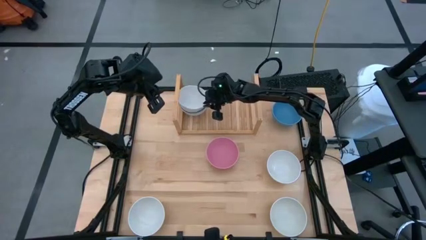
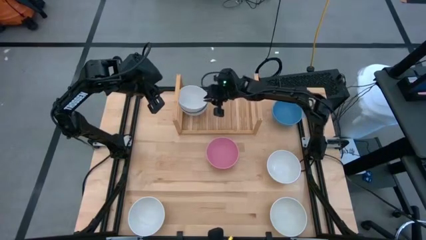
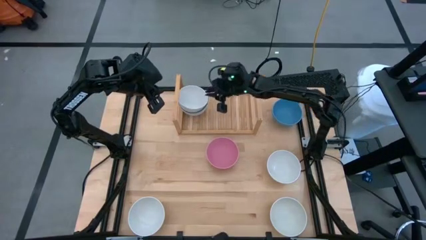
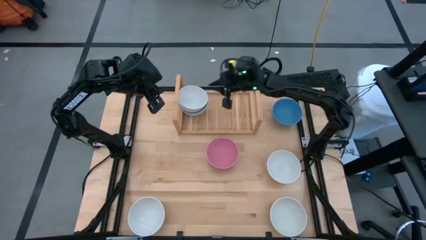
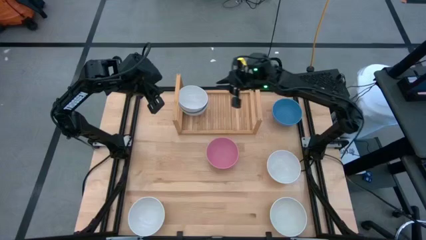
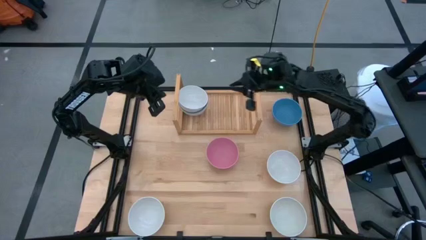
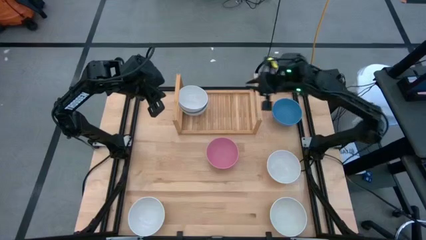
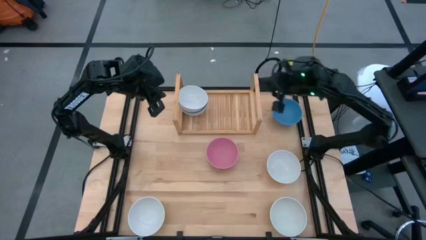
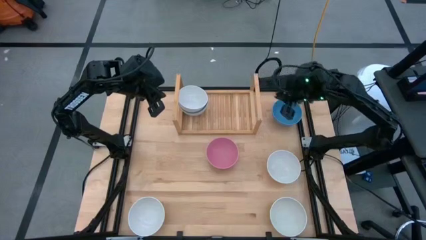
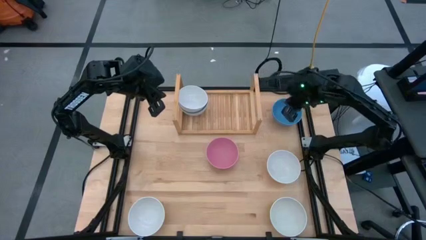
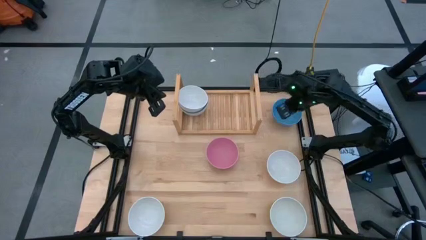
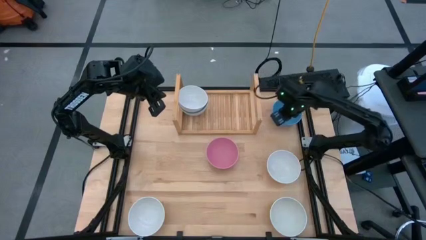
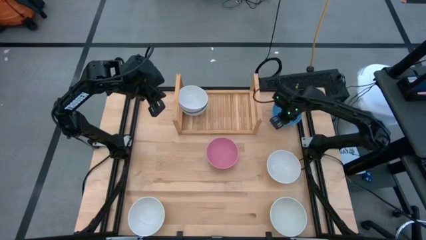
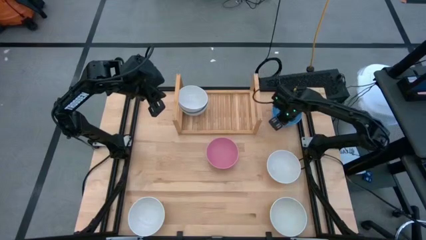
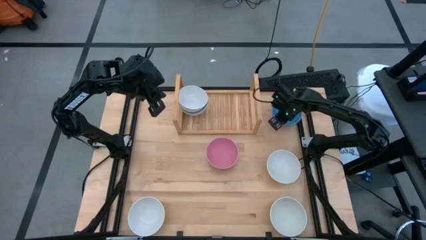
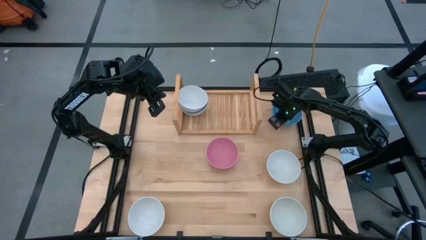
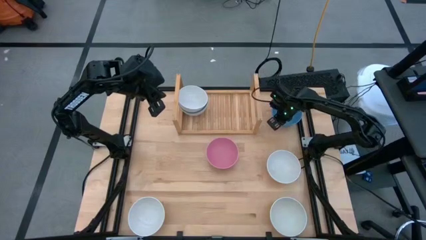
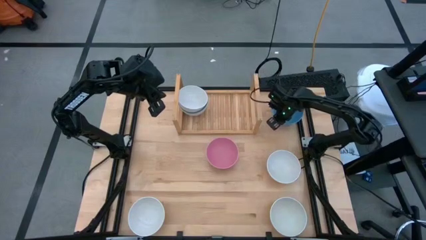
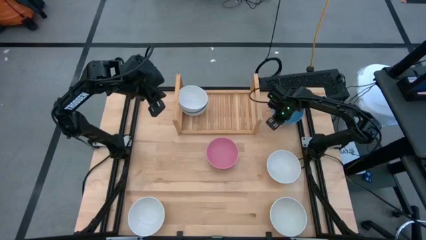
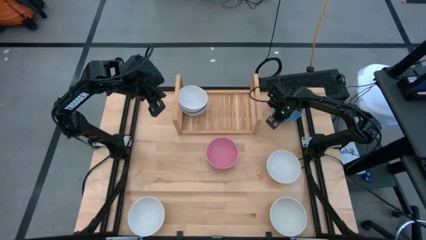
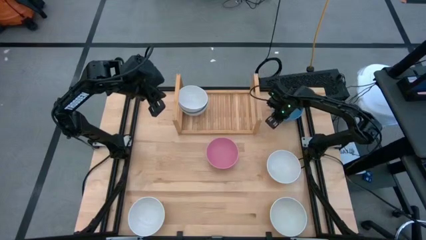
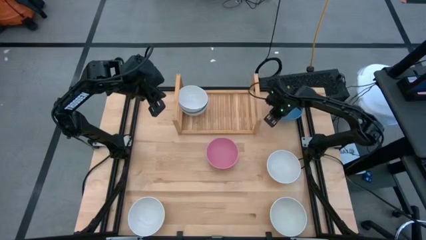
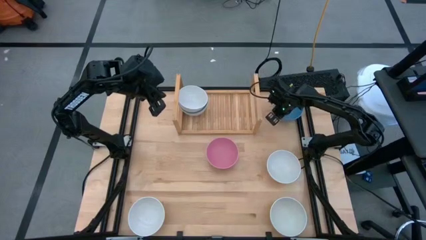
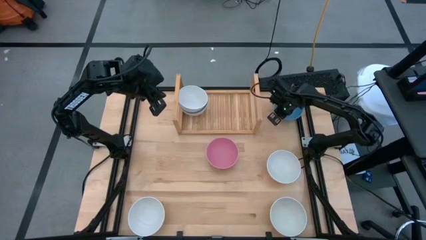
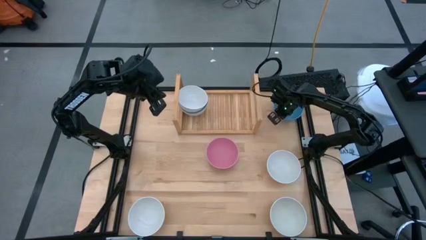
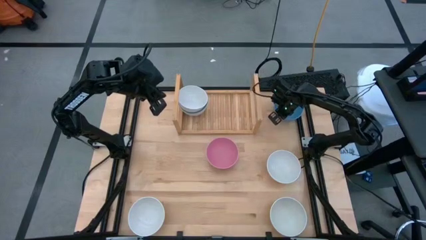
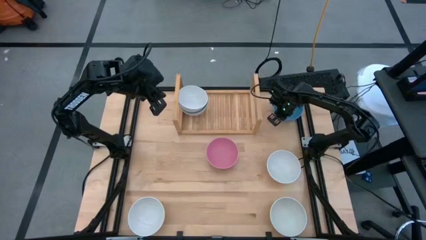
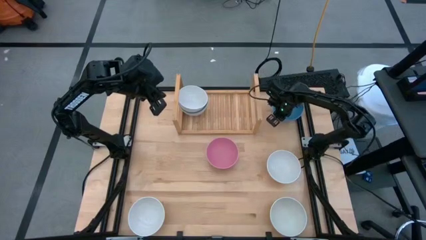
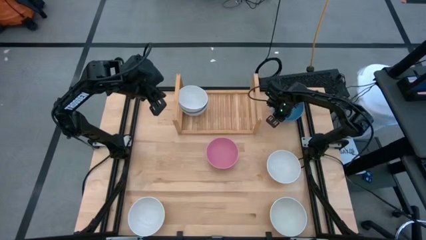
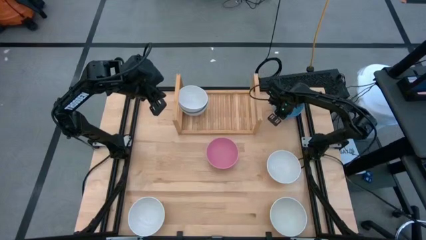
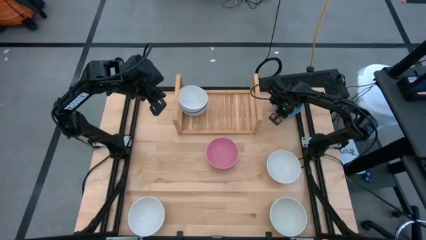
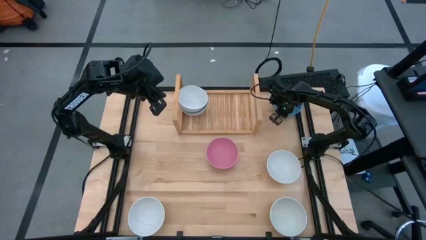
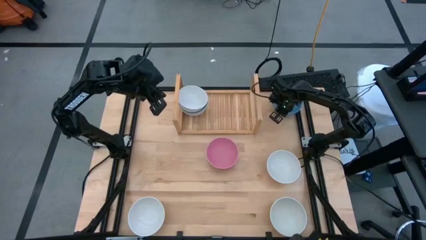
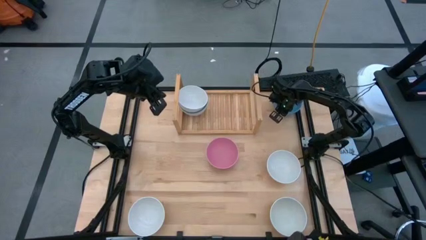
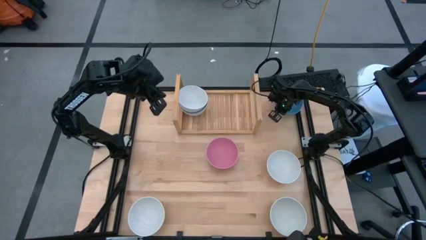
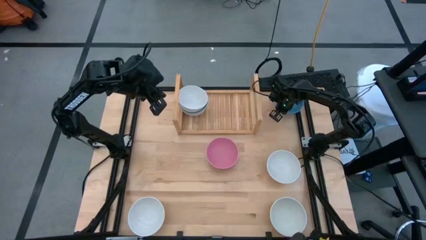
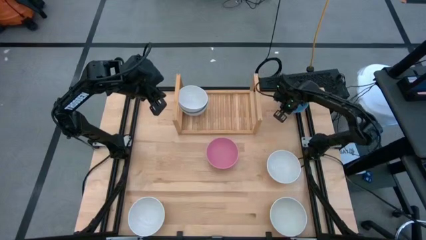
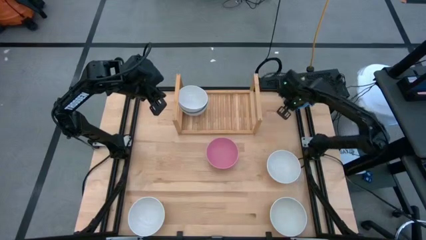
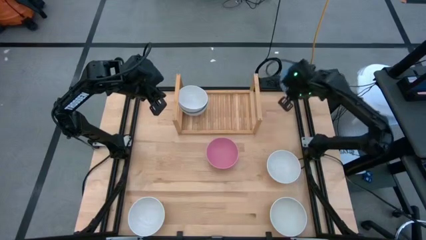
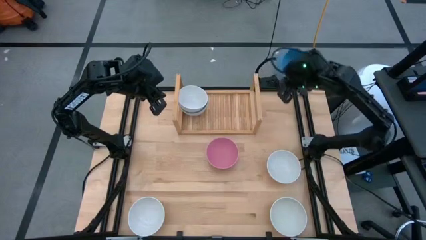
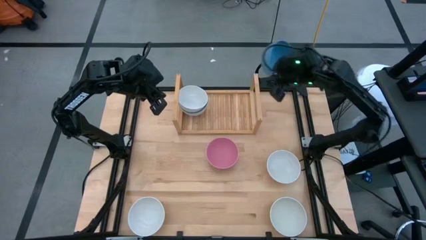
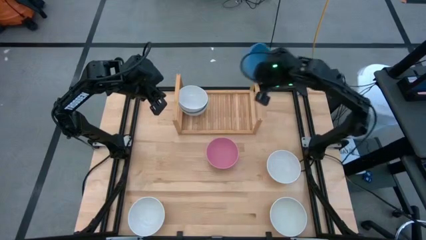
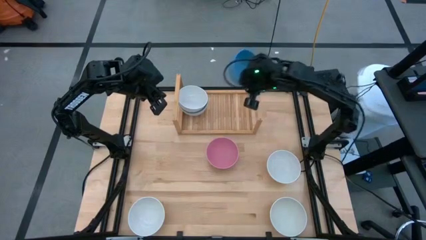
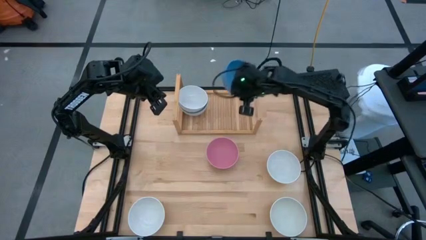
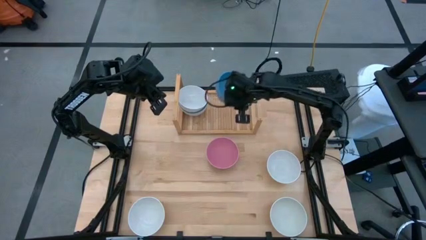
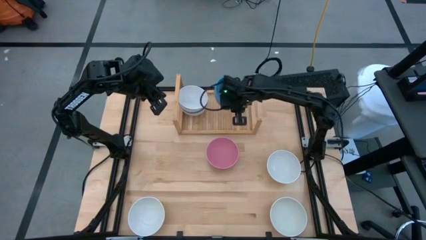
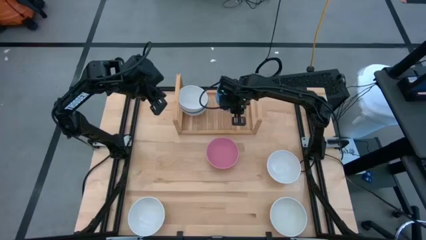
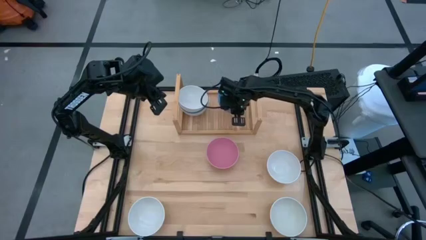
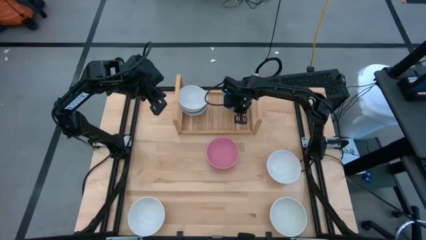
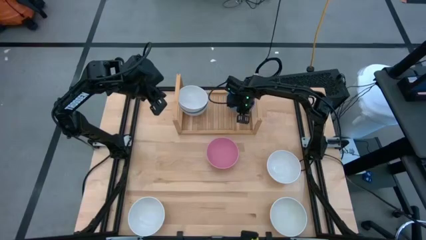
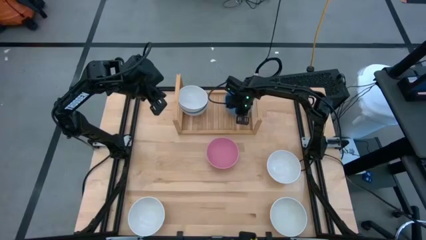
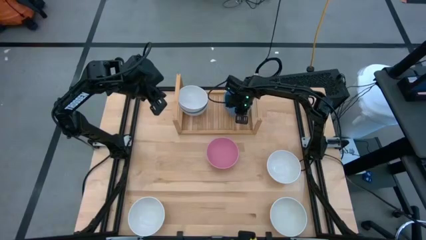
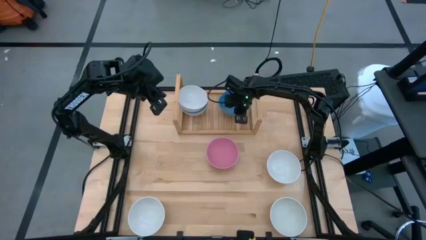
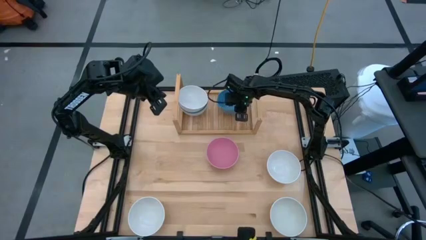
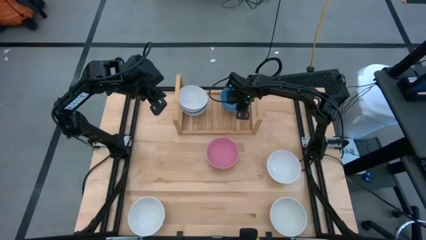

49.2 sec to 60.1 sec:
Task: Place and stack bowls onto a shelf
Put the blue bowl on the shelf

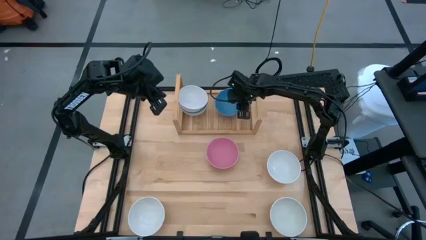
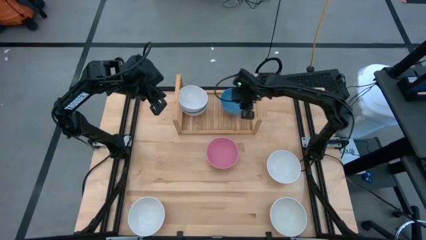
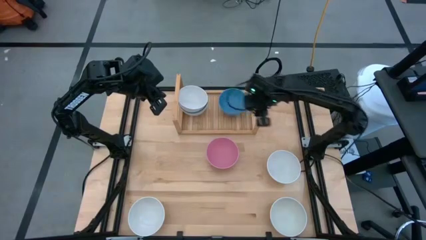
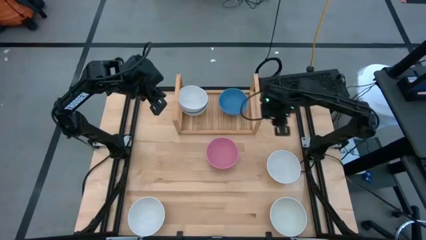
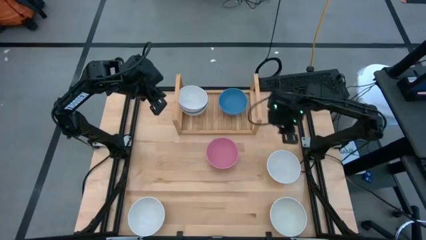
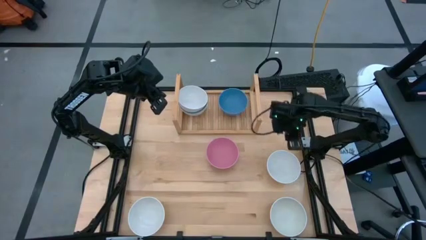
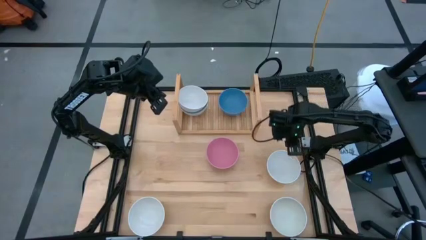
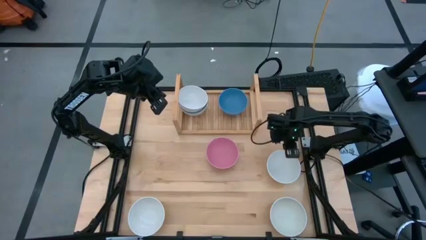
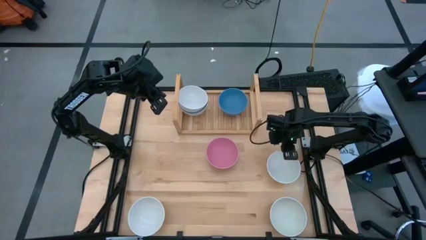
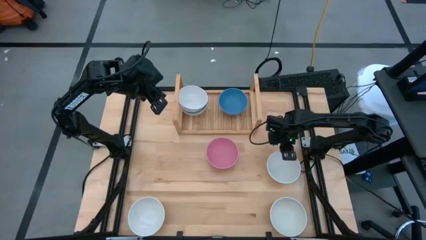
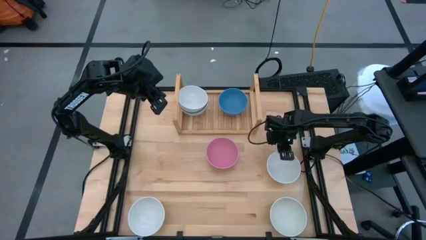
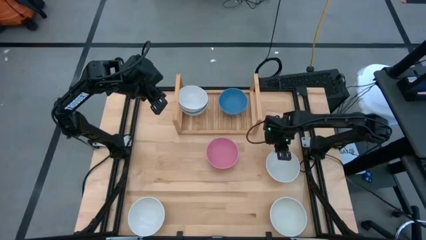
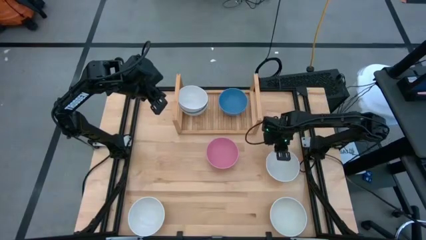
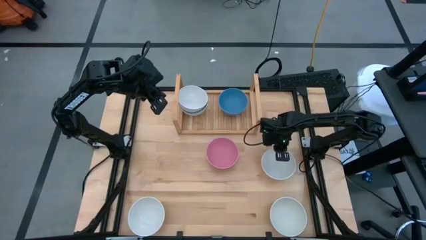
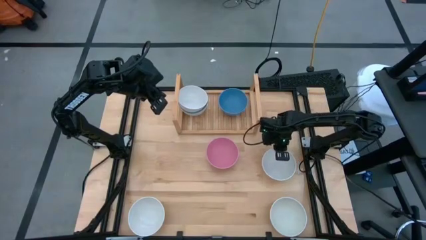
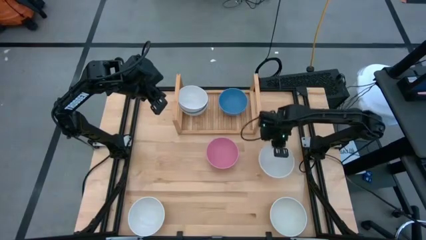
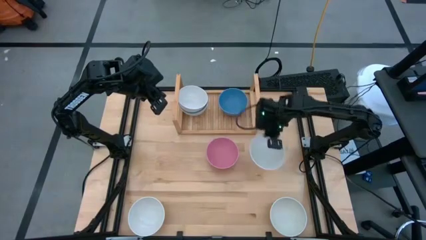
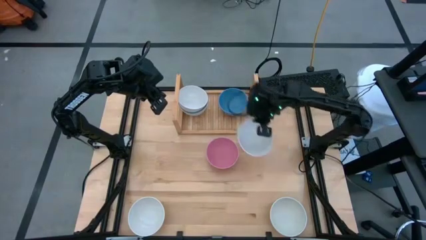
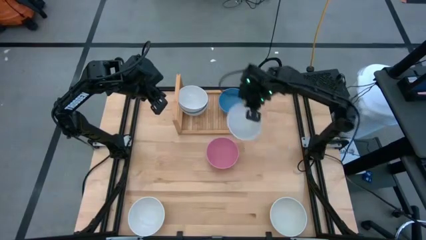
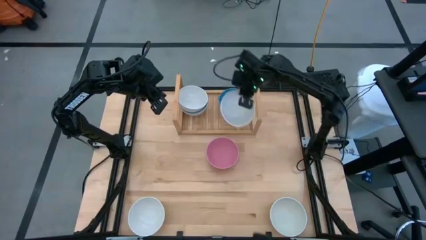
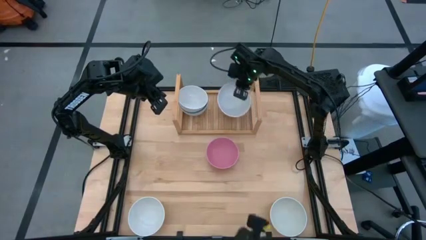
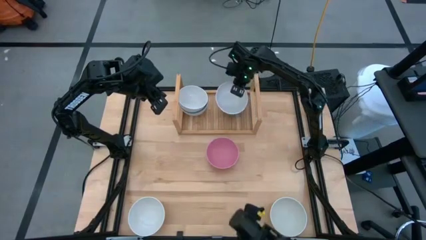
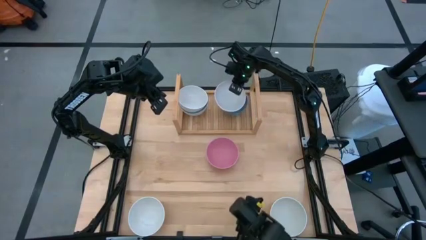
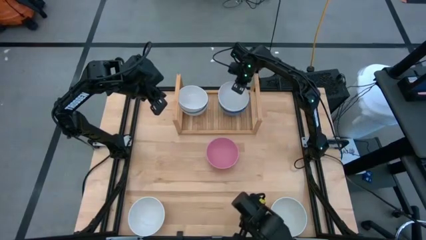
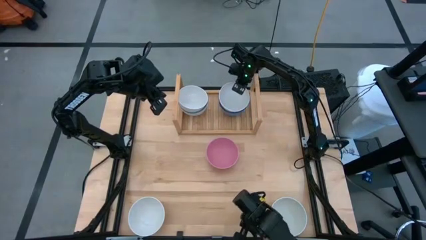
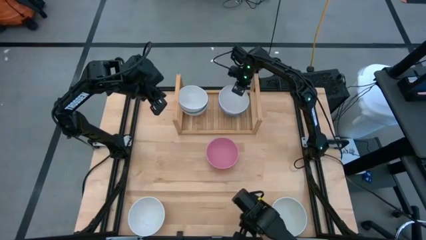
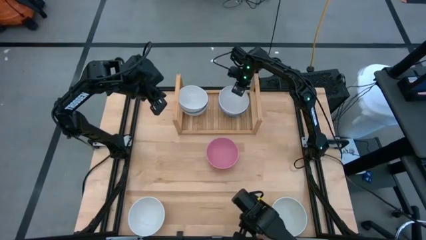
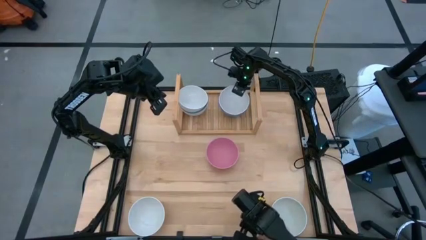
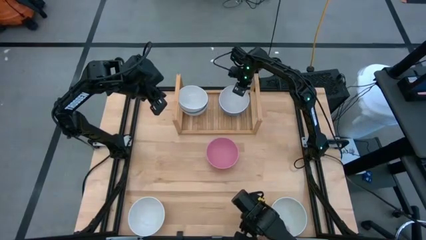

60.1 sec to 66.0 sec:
Stack the white bowl on top of the blue bowl on the shelf
